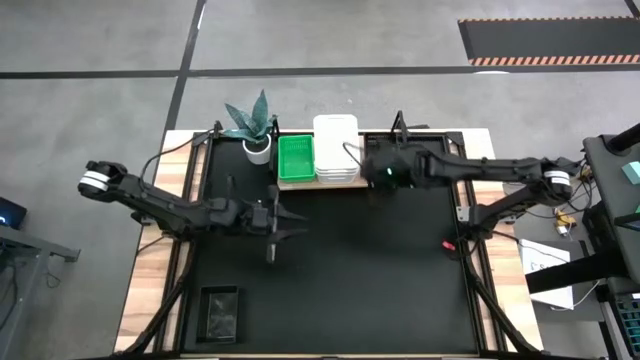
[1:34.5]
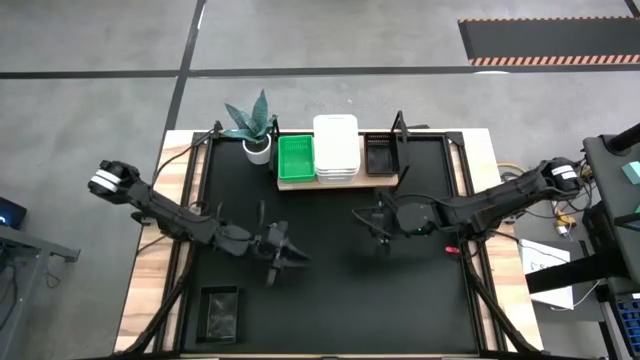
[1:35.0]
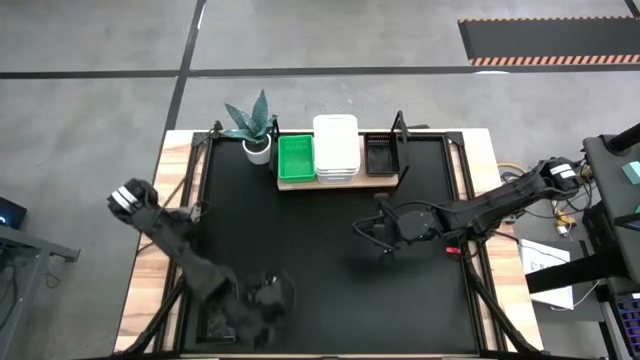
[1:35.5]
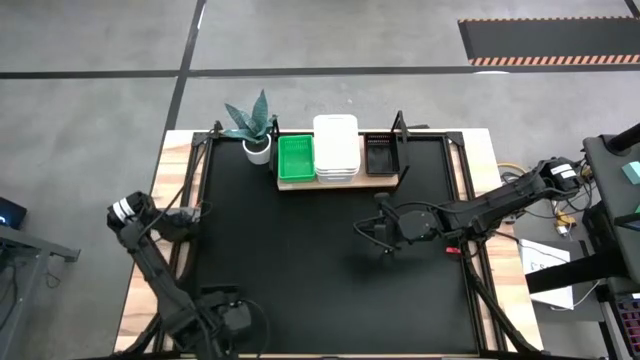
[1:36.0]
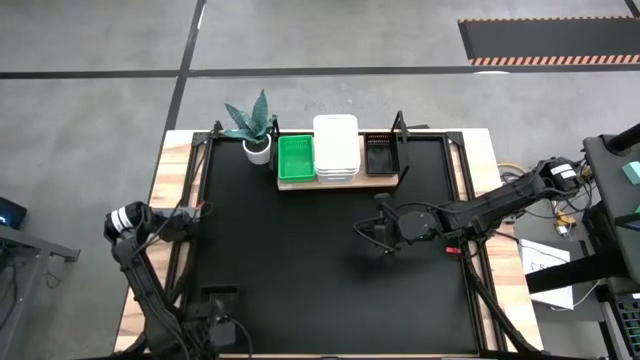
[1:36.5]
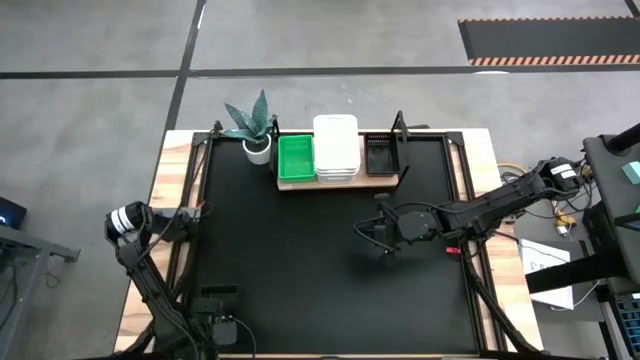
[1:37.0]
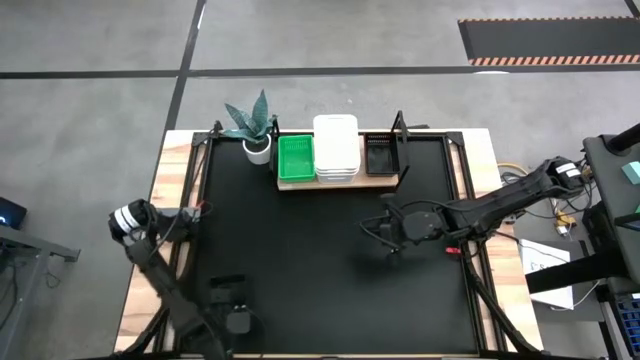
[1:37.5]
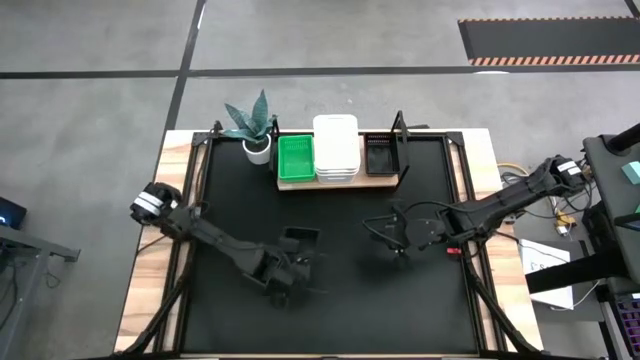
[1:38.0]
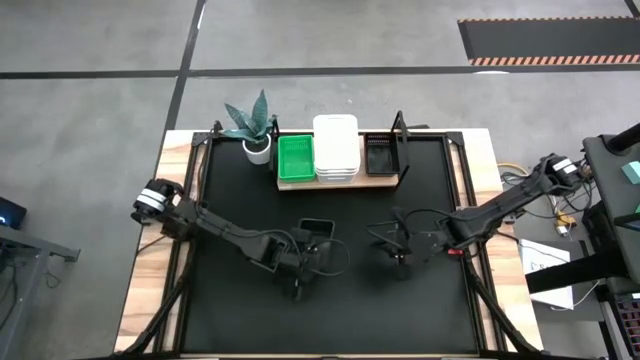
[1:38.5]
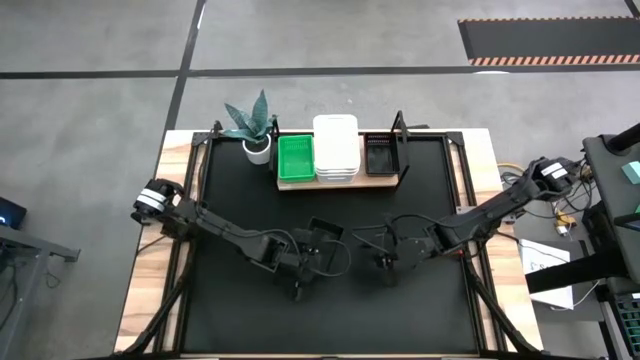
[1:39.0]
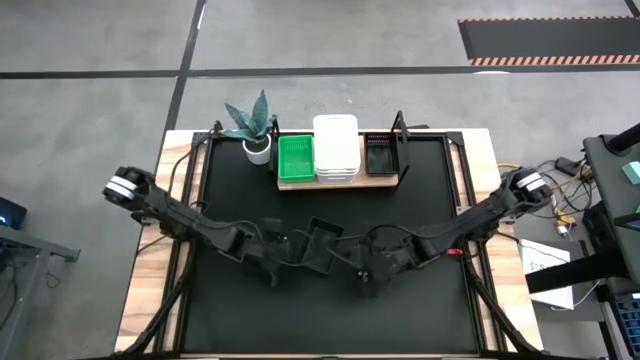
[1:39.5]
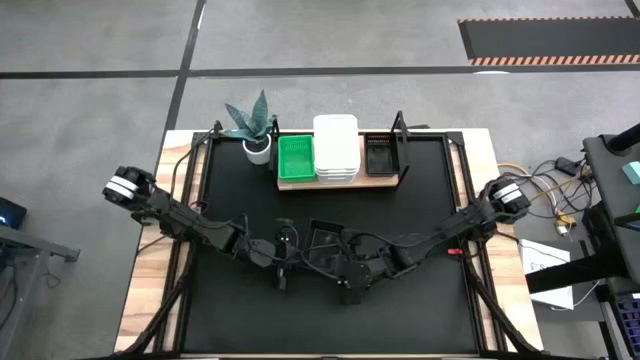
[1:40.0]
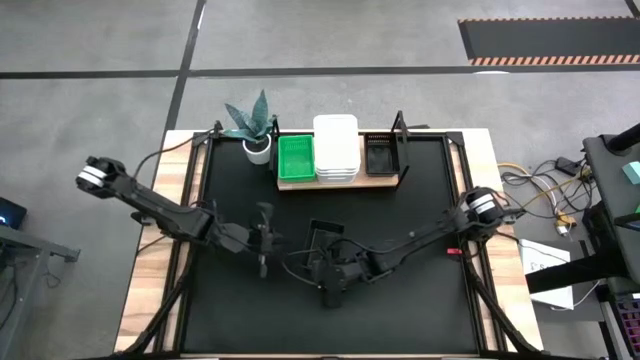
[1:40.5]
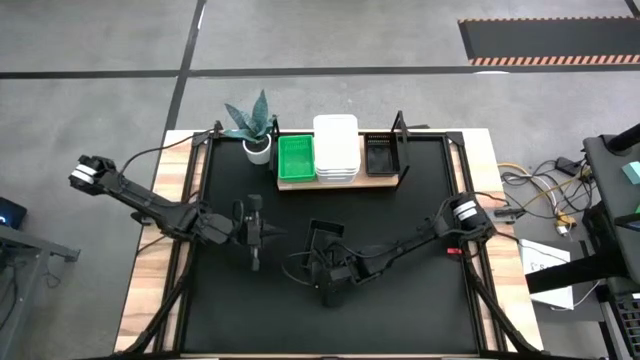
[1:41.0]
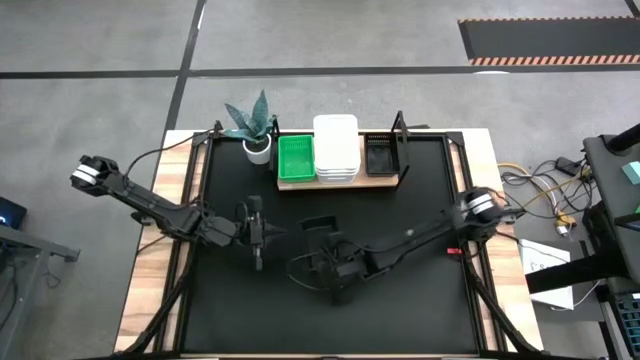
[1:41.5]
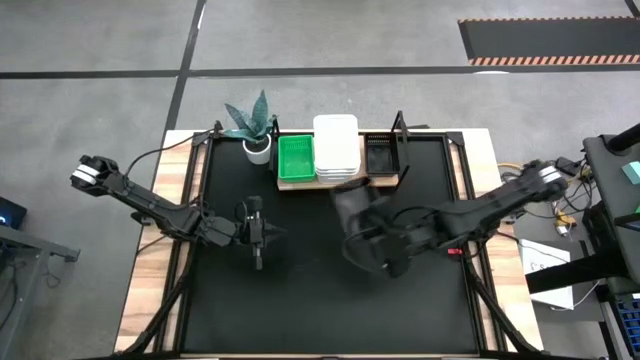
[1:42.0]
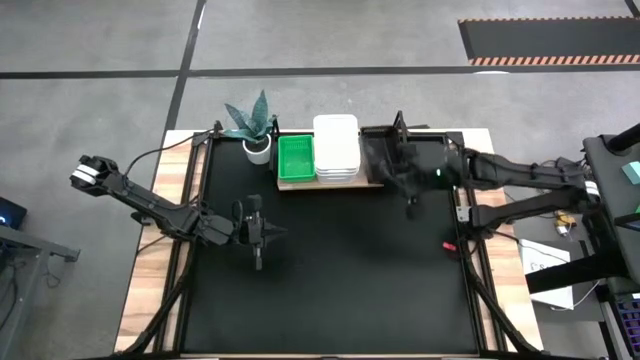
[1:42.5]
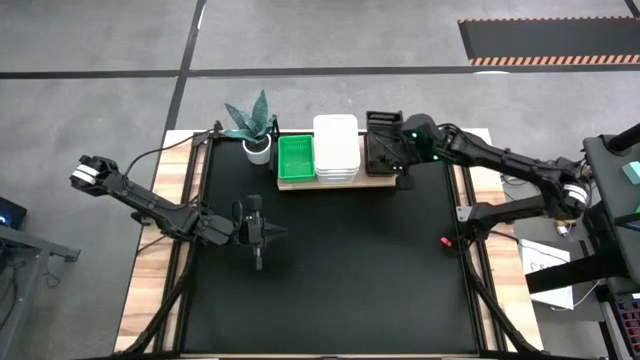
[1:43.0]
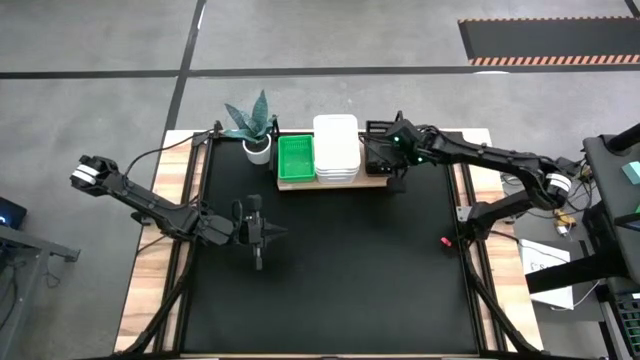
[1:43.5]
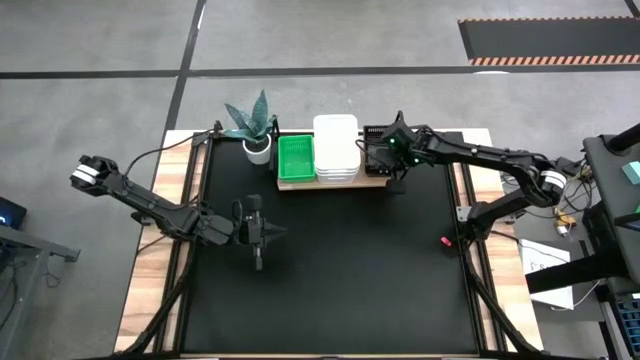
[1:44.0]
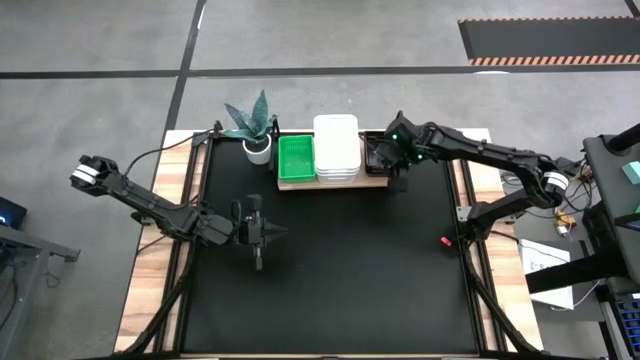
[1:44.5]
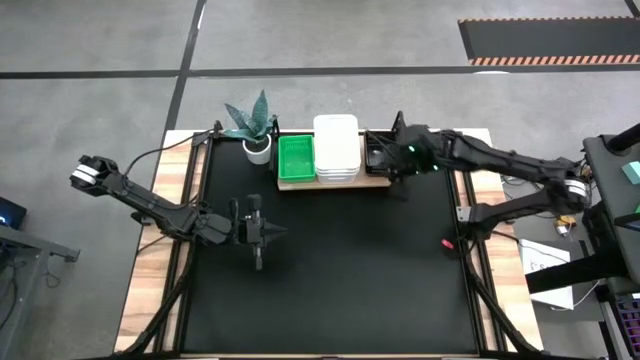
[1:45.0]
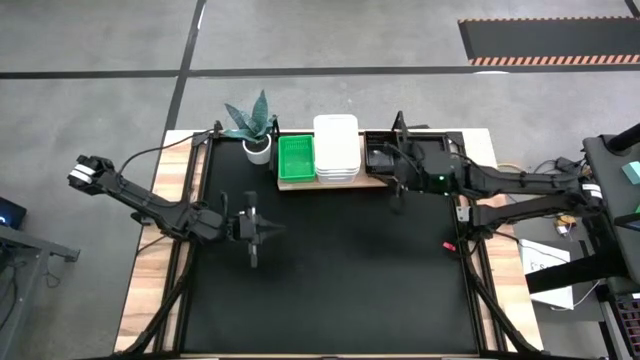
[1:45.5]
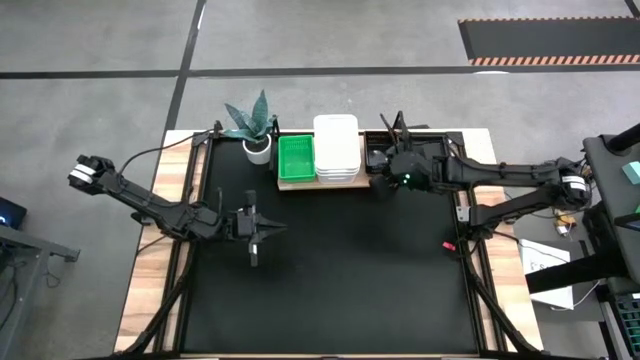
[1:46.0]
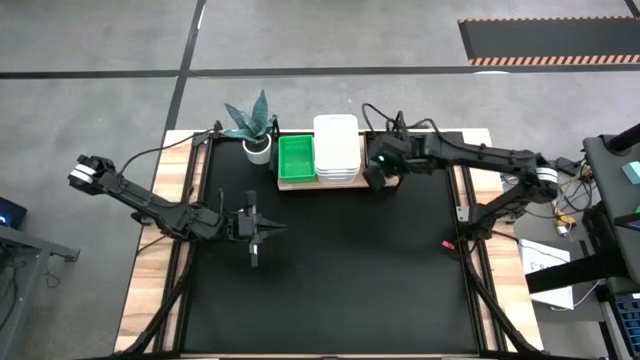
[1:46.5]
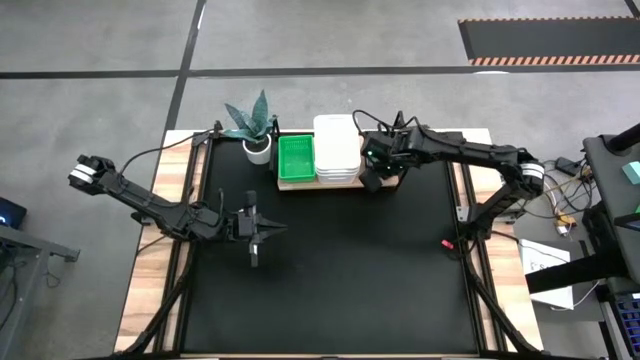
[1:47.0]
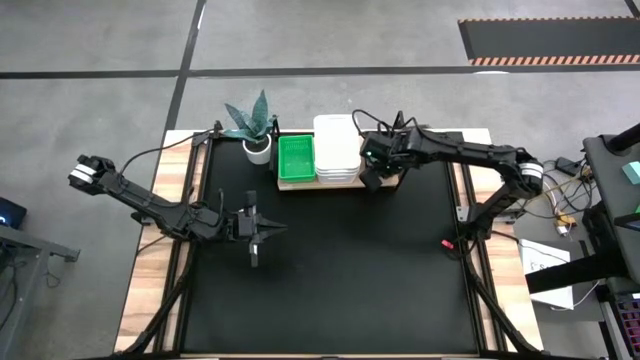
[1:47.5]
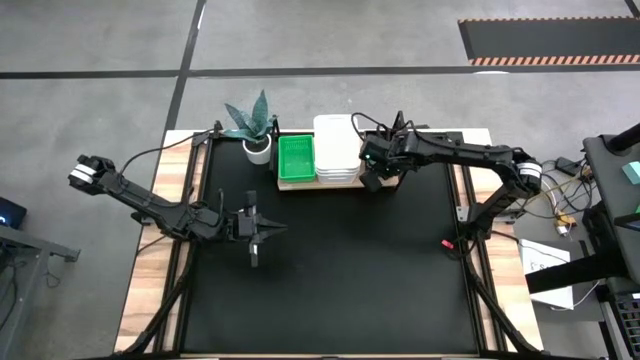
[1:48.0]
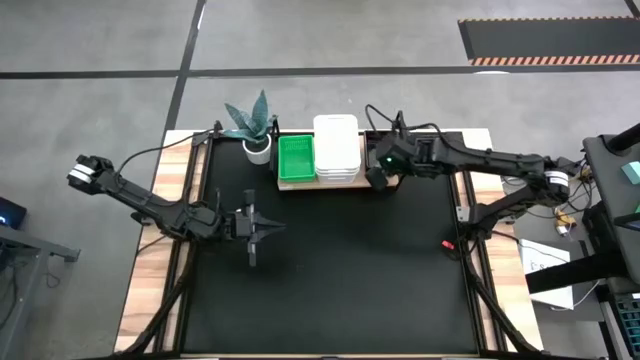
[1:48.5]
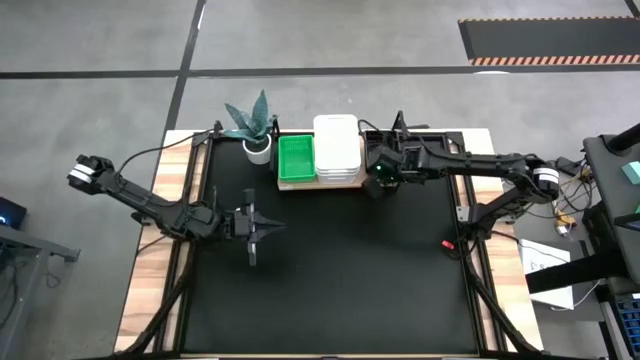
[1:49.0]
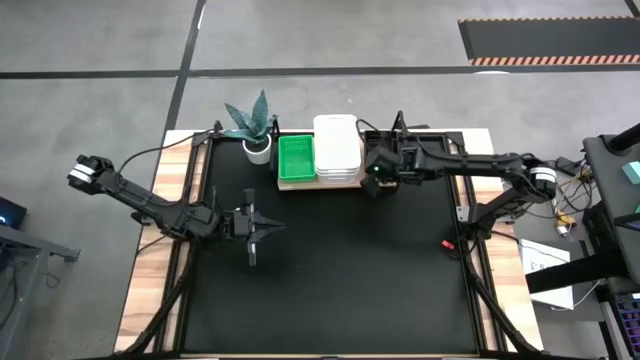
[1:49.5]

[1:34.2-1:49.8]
Task: Stack baskets on shelf by color
Stack the black bin into the black bins on the shelf

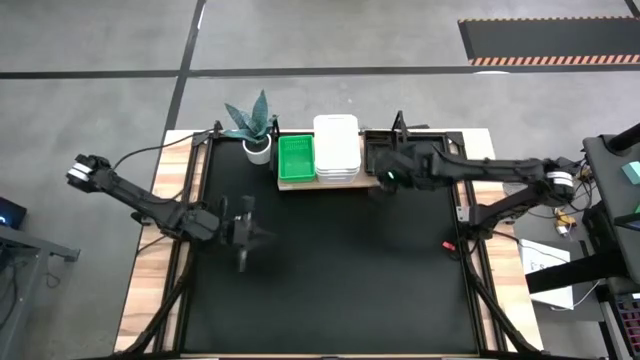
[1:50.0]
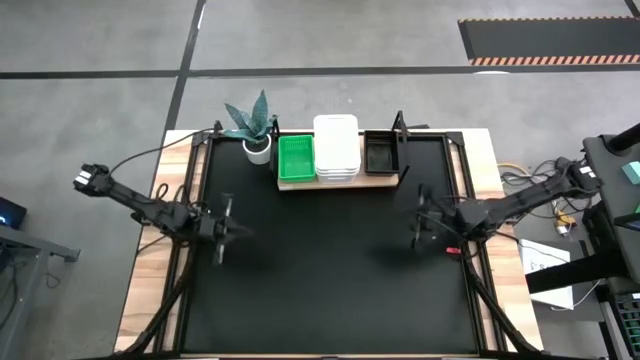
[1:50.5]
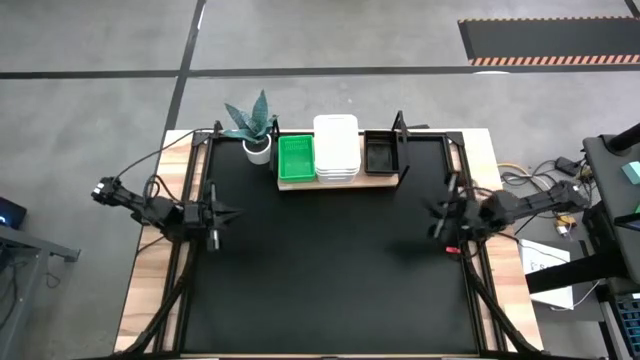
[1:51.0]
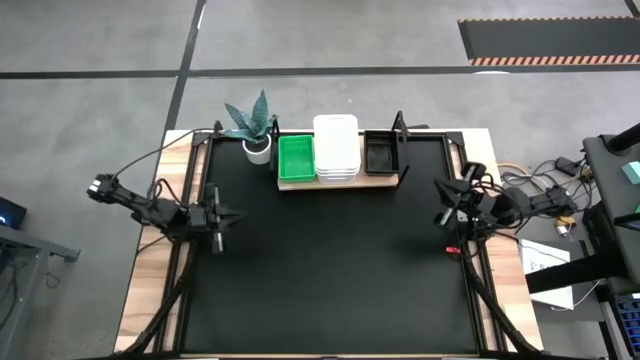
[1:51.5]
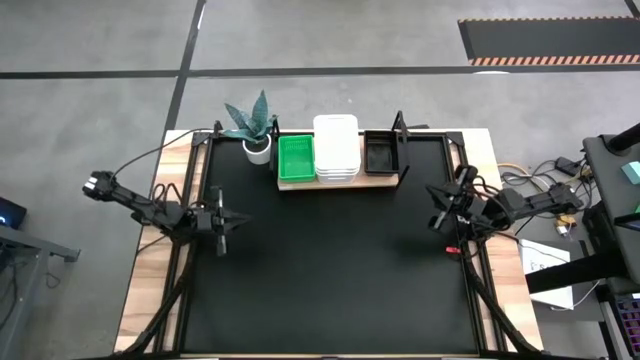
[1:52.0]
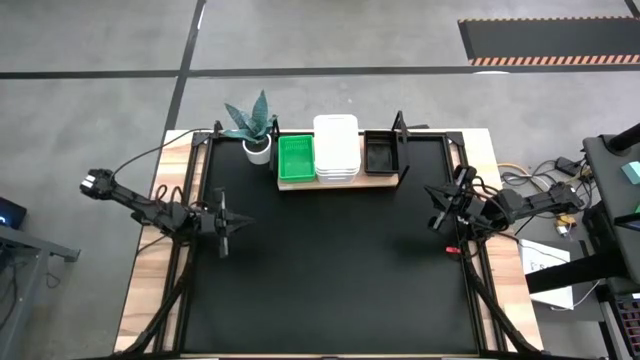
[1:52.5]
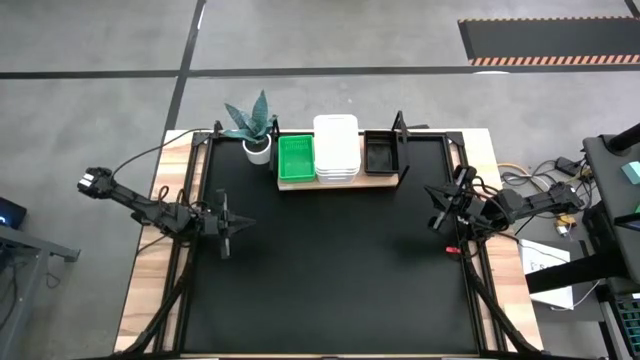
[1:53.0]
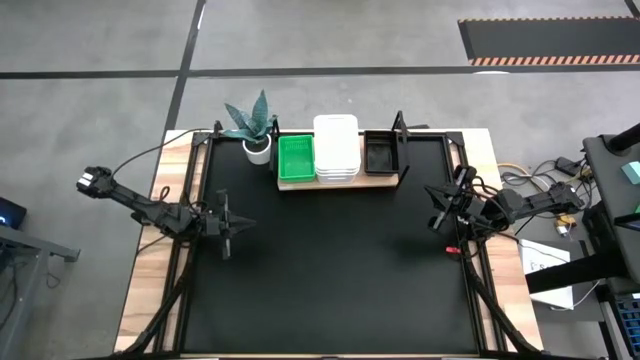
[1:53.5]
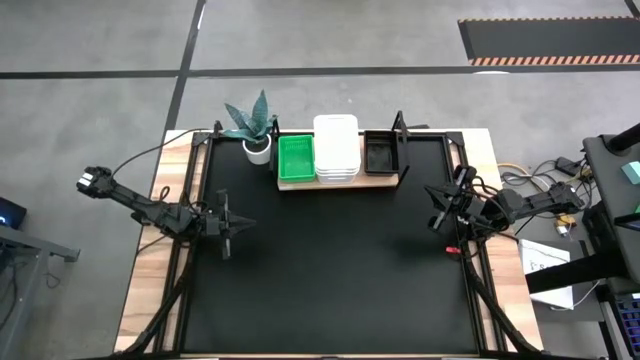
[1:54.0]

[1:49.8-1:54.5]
Return to Home Position

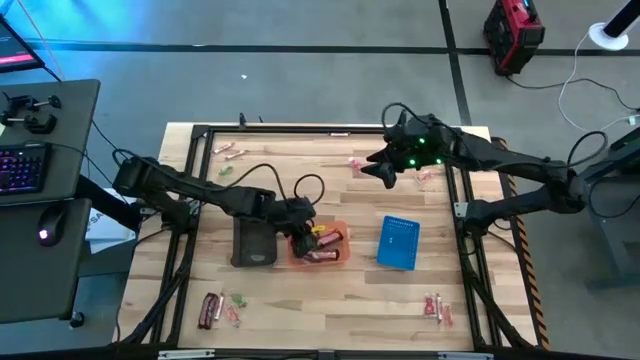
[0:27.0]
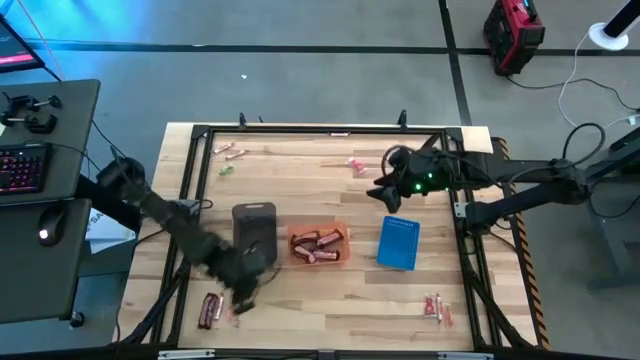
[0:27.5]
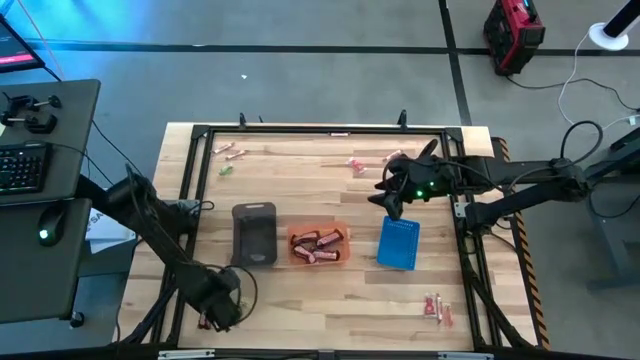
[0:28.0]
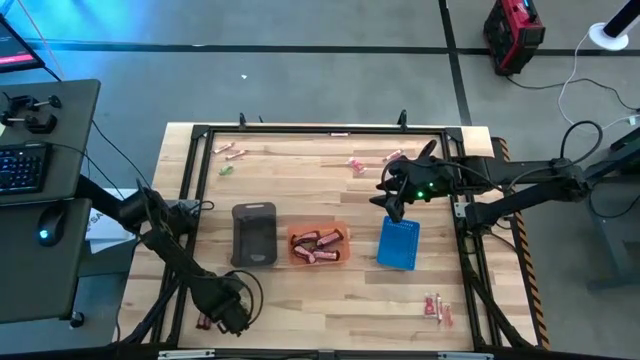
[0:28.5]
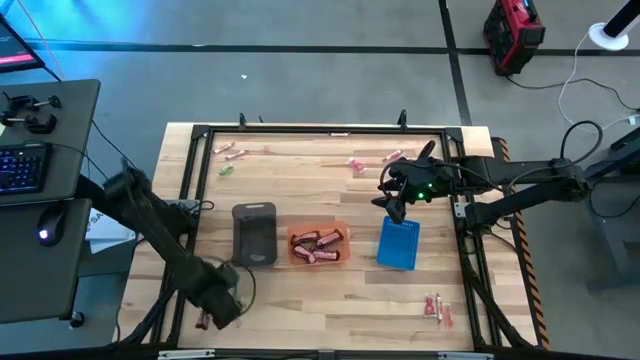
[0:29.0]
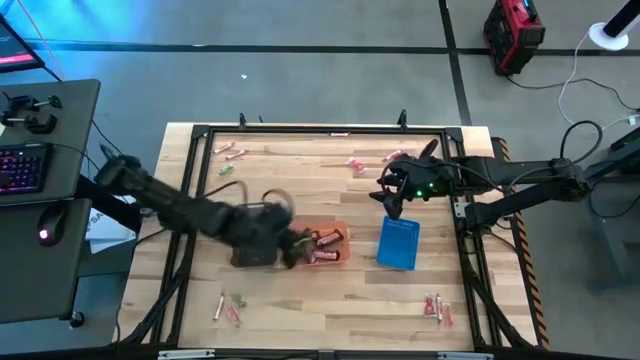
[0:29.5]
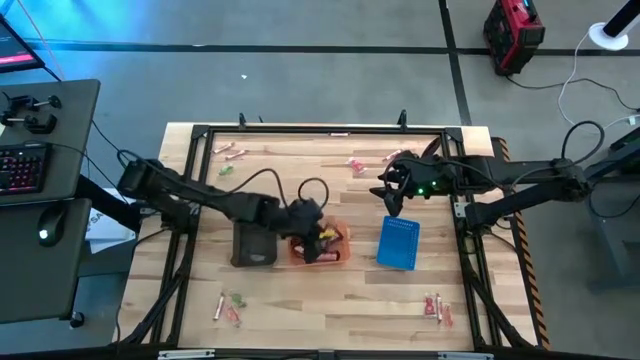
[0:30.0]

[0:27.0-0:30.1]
Task: Sort candy by brand, put in halloween buckets
Put the brown chocolate into the orange bin
